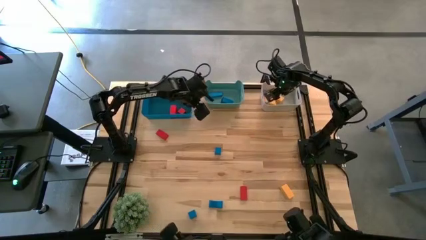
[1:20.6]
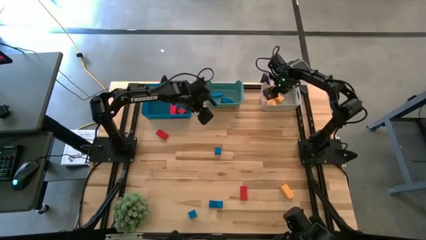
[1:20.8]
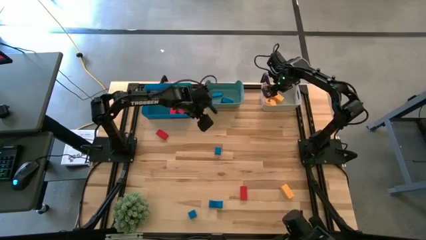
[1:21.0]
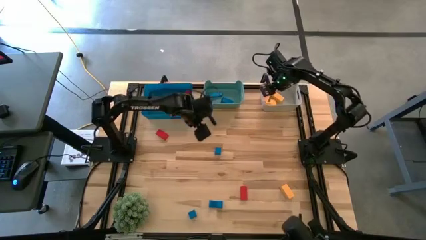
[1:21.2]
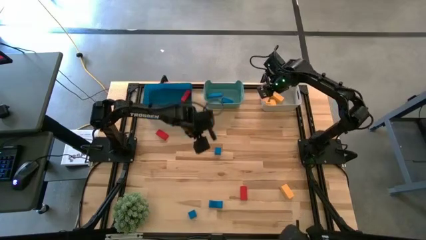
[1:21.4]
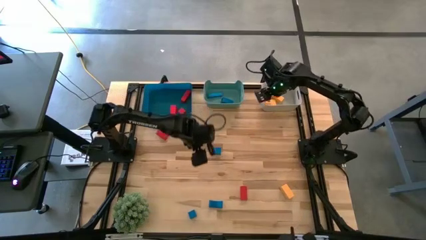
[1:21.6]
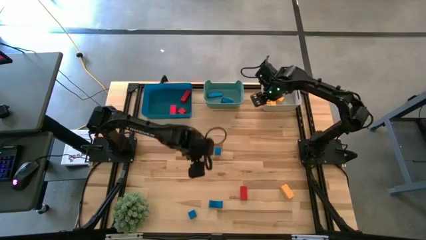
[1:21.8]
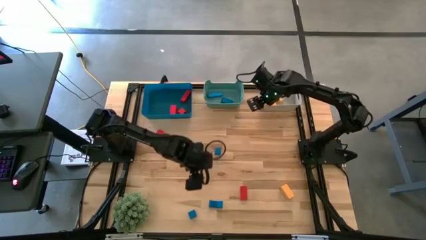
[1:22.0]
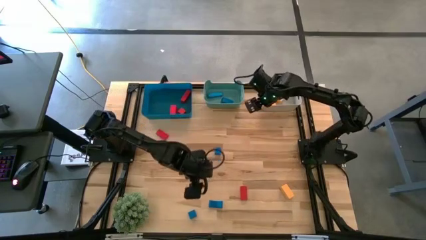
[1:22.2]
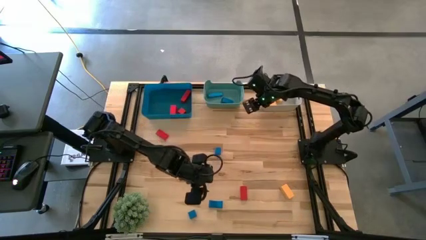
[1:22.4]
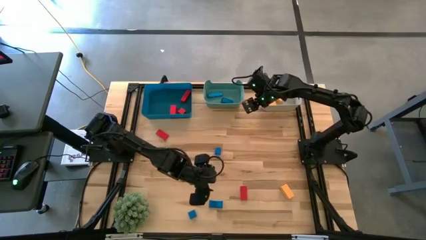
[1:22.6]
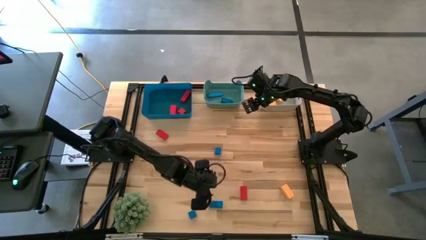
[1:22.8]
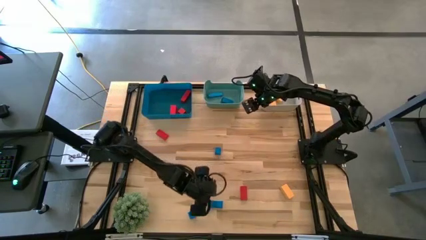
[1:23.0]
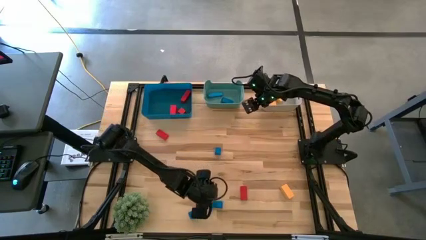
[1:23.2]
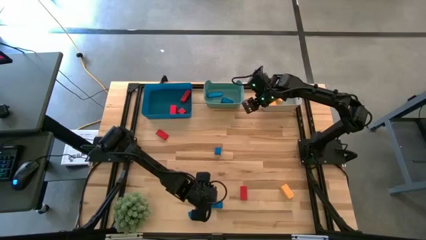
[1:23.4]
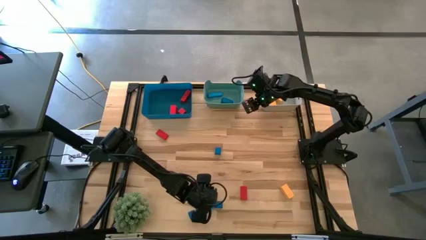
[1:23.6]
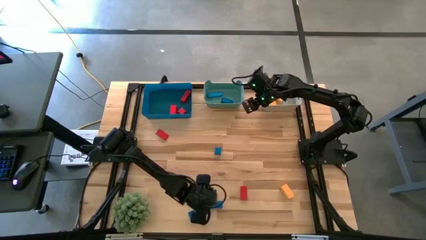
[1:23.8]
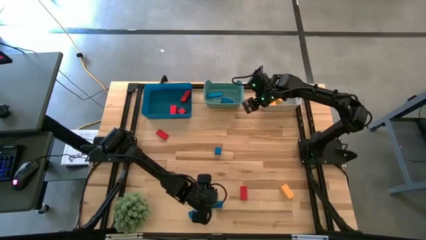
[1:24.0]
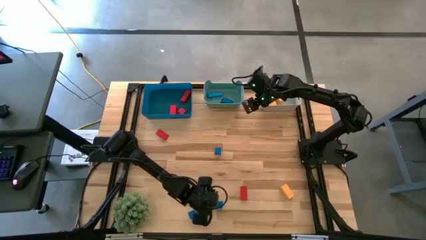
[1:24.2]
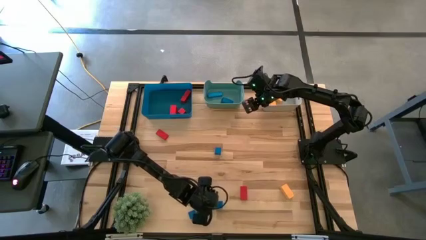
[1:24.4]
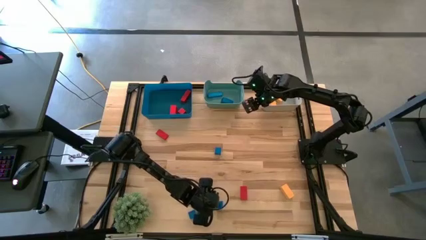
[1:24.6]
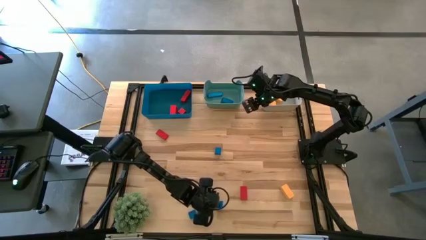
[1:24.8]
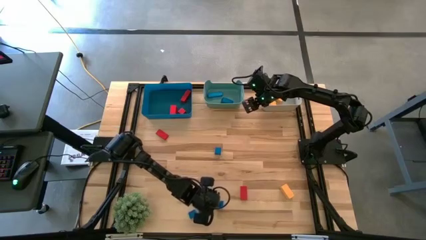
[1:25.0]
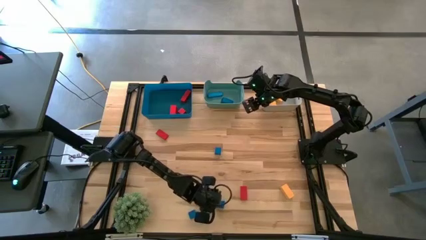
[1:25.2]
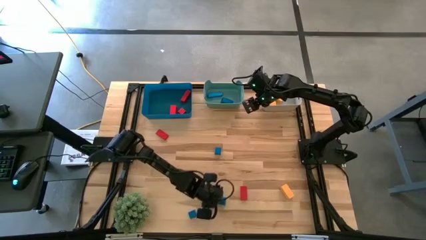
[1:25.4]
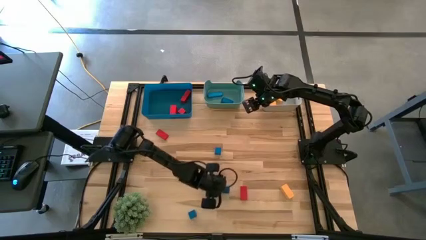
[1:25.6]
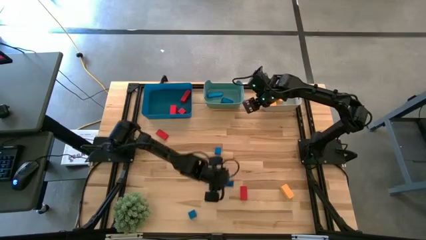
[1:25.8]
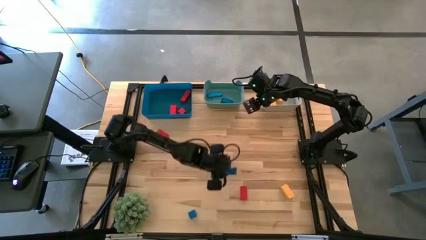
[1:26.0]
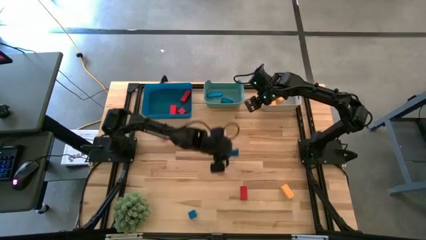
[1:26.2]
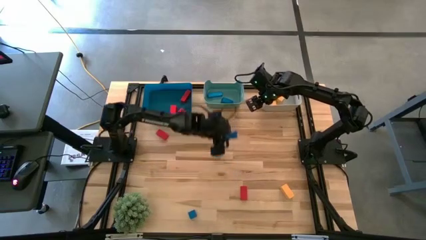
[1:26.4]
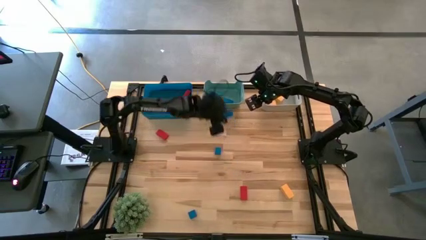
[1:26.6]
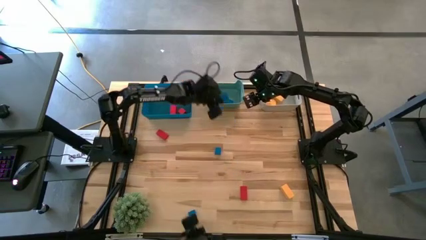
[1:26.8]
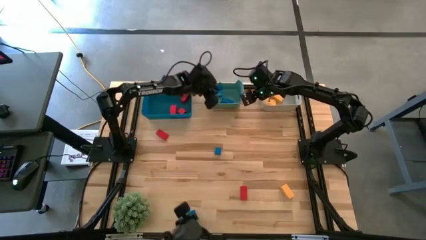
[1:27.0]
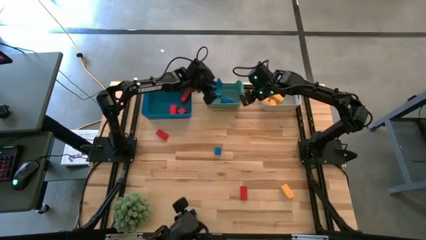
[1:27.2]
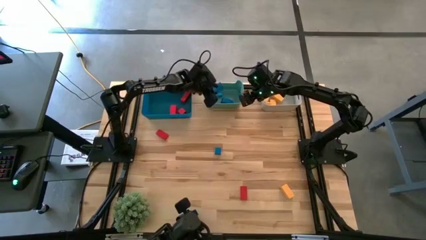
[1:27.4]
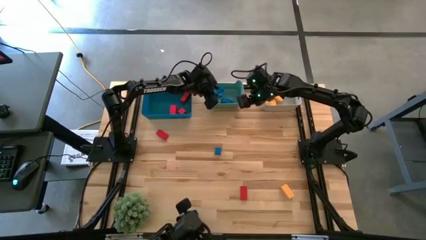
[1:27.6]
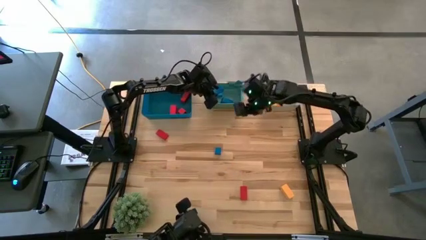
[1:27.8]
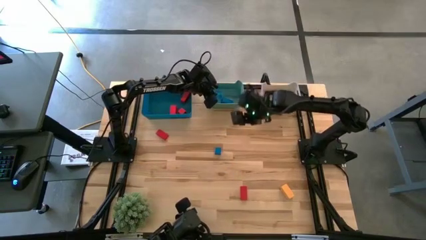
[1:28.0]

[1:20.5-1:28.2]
Task: Sort & place blocks by color
Put the blue block into the green bin

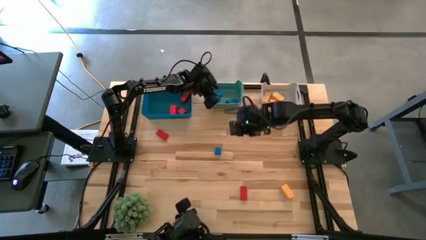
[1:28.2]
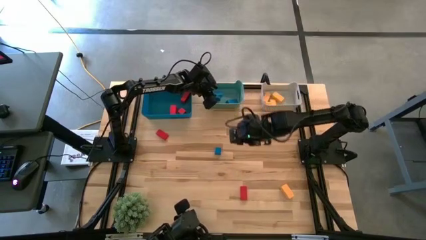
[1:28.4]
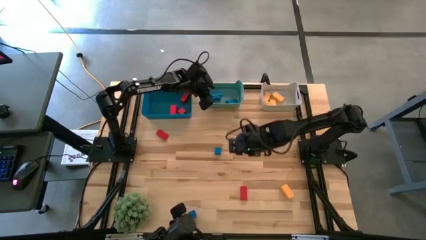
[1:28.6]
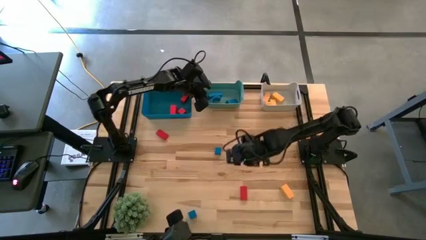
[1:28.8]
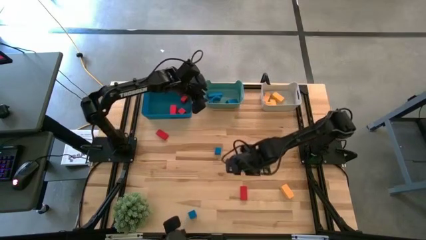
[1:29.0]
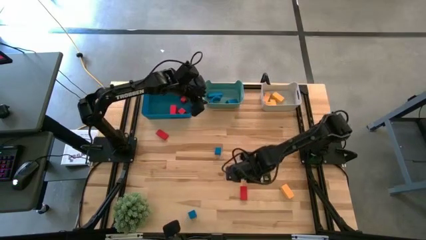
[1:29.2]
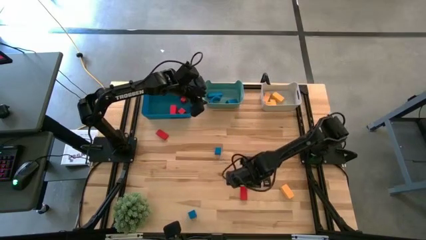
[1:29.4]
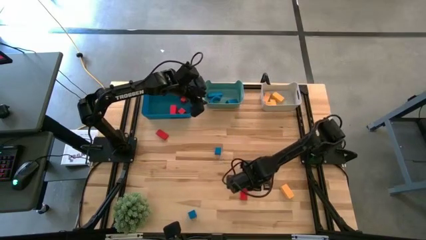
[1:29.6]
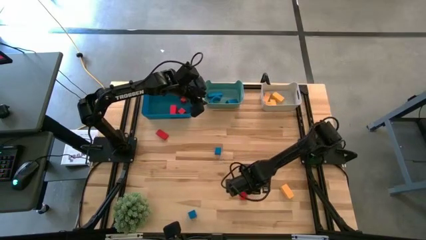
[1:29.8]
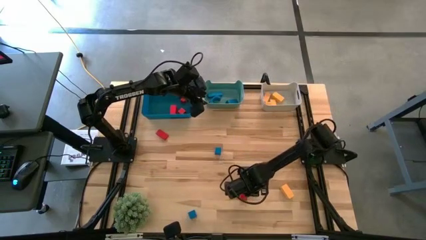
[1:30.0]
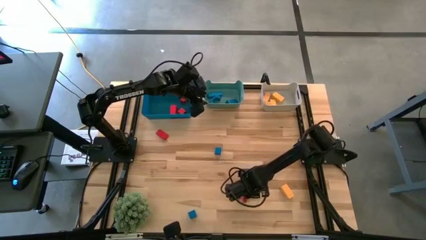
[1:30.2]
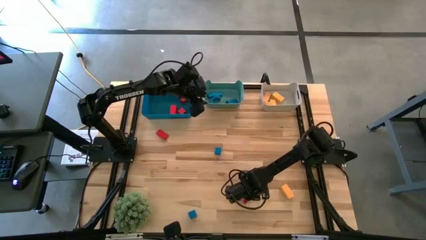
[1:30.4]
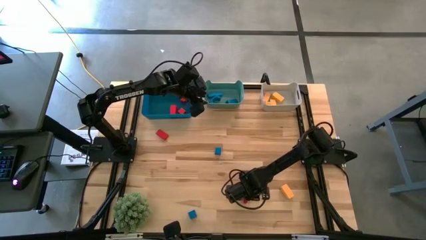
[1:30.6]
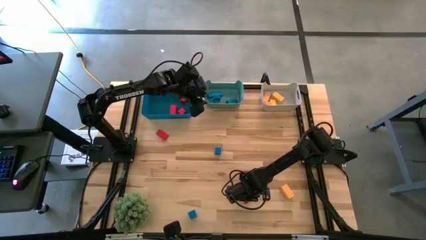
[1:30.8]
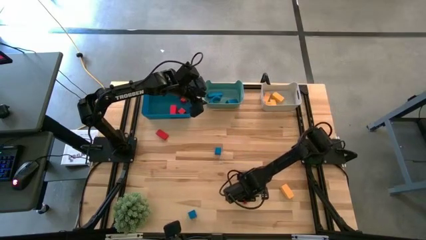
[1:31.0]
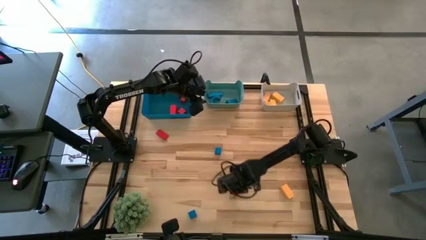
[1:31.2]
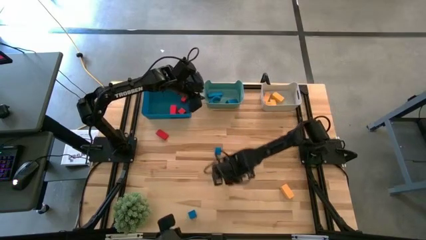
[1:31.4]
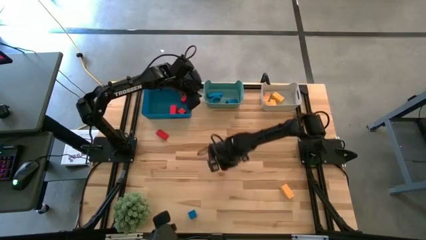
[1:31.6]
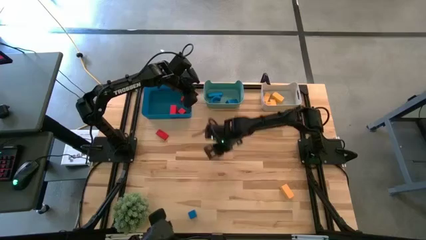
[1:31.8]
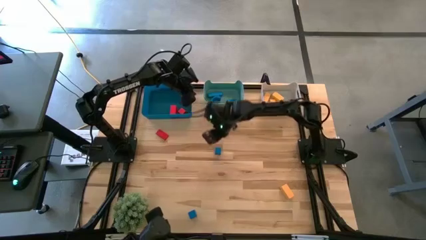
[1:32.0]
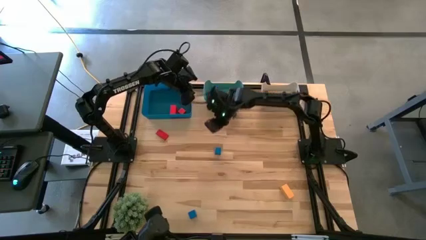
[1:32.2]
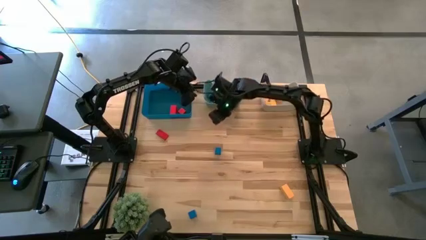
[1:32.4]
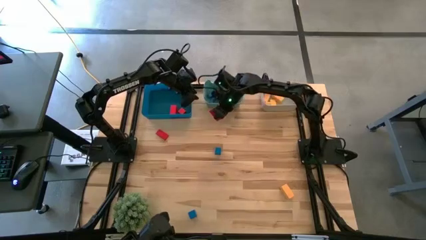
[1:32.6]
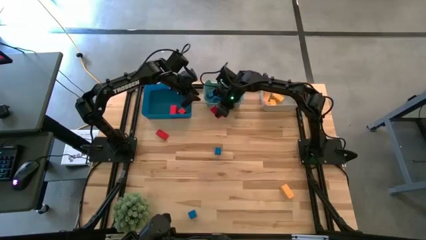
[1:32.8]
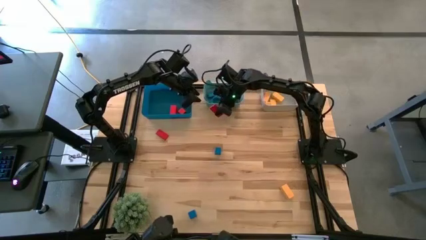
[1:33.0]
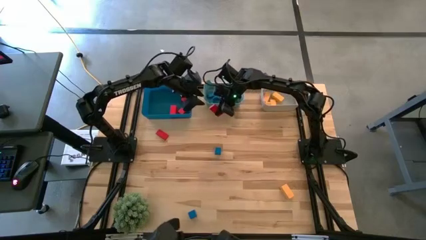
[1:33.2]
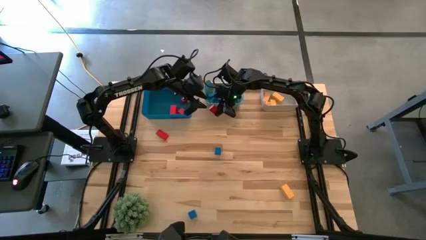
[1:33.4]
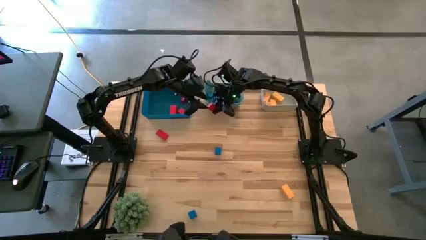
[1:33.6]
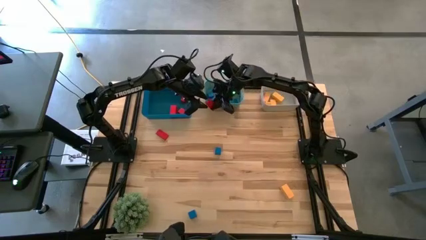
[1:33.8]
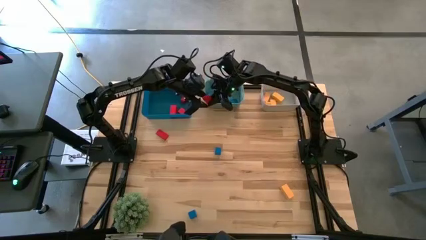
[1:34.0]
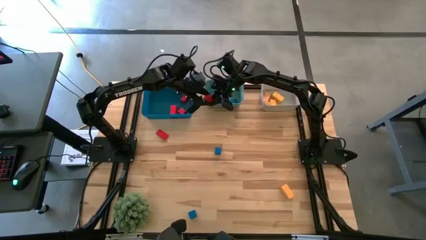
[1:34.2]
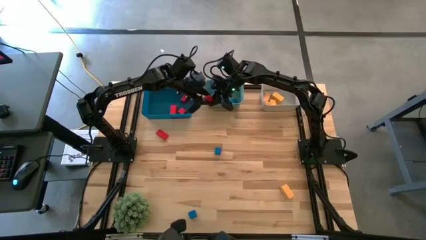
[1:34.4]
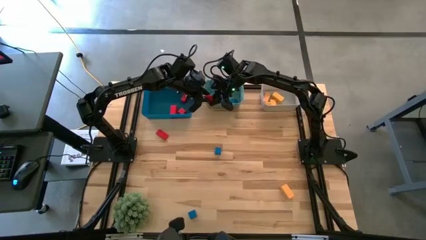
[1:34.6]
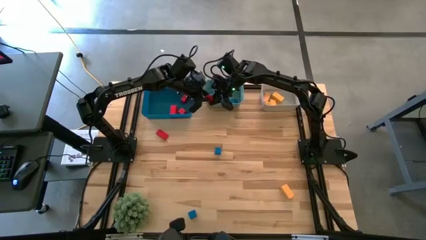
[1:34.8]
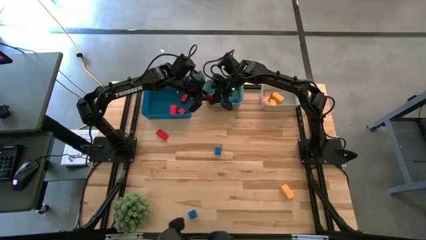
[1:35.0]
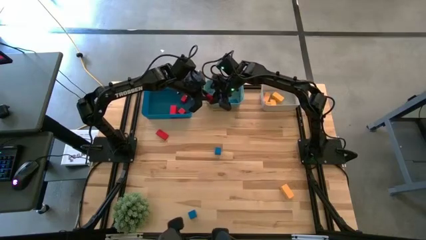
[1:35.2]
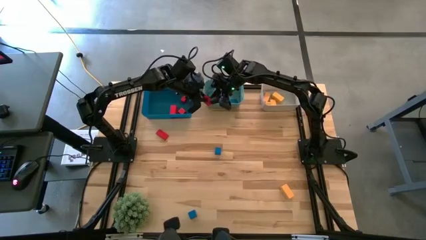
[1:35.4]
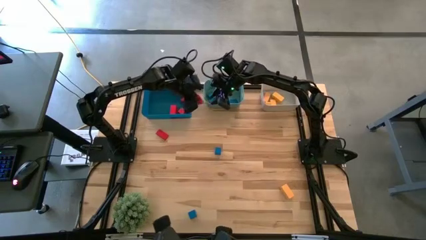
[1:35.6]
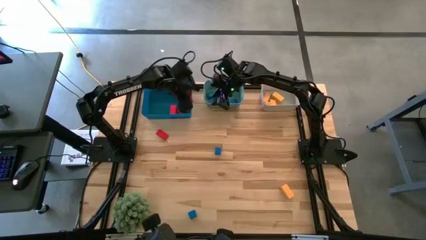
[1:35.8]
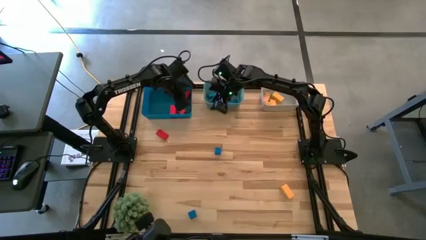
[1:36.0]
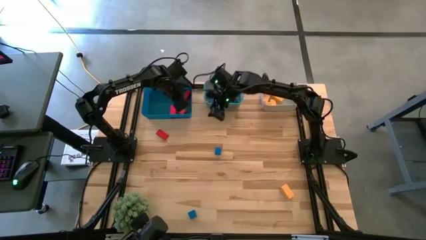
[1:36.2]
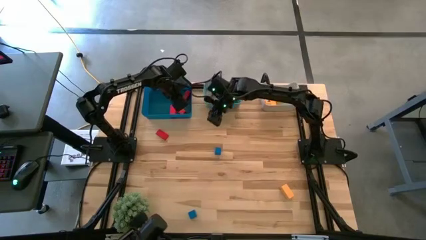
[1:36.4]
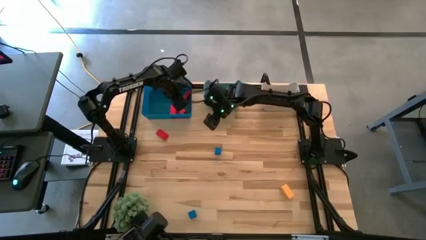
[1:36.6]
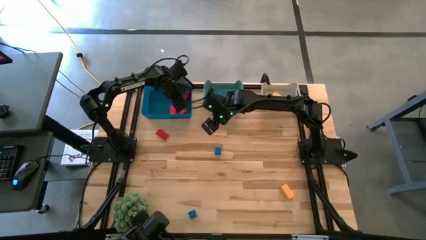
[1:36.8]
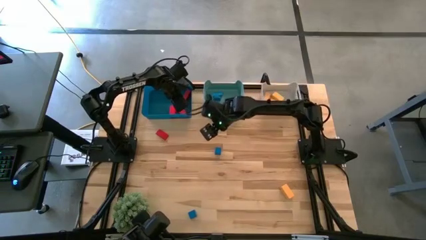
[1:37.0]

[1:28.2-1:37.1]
Put the red block into the blue bin
